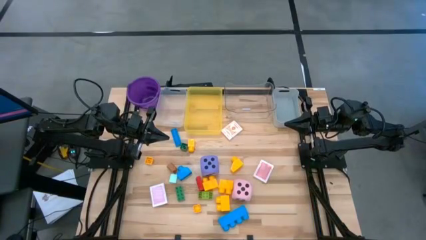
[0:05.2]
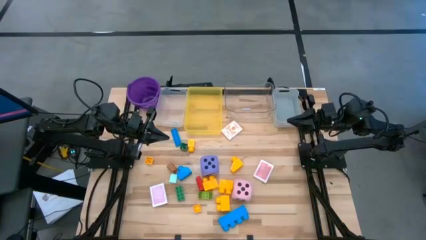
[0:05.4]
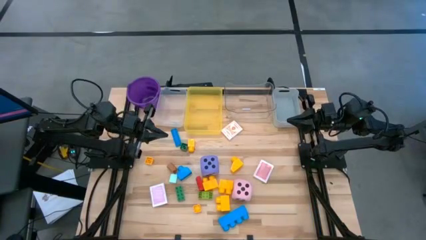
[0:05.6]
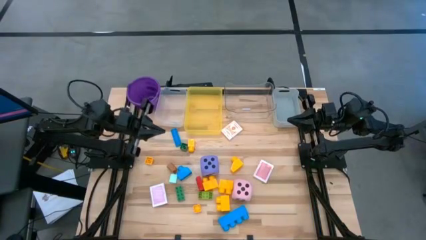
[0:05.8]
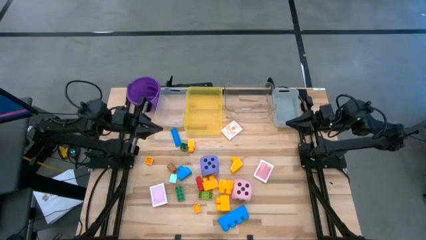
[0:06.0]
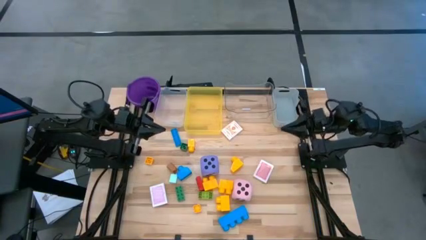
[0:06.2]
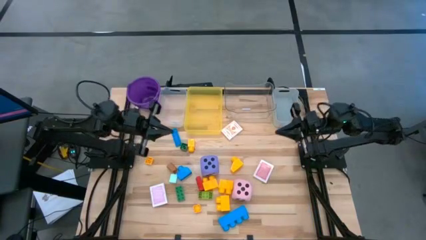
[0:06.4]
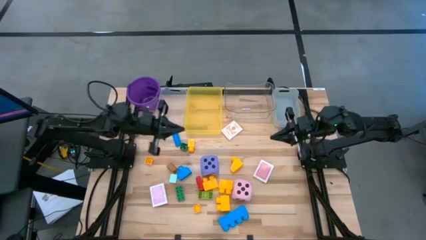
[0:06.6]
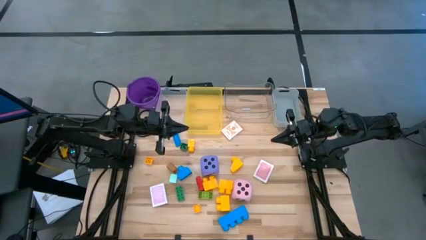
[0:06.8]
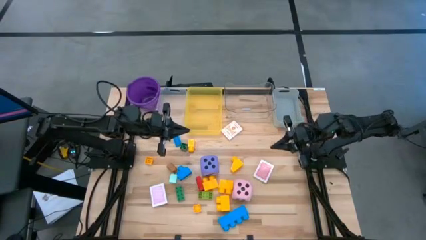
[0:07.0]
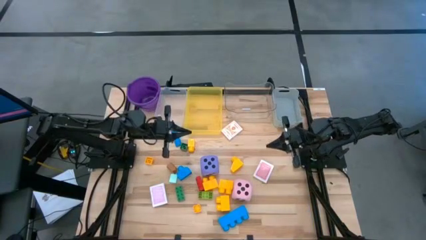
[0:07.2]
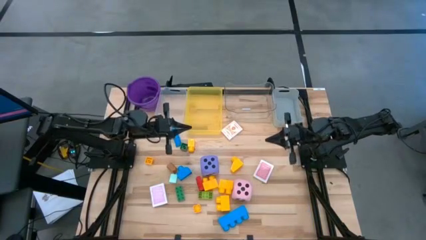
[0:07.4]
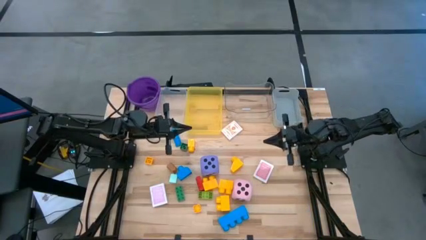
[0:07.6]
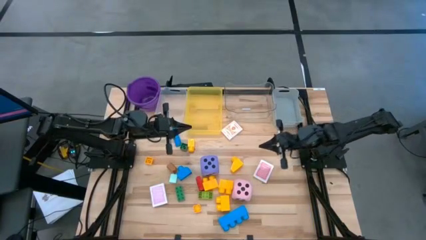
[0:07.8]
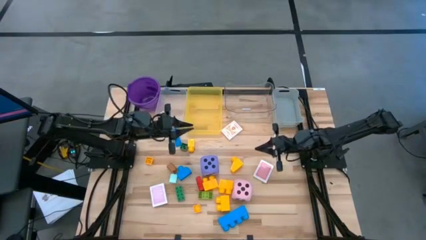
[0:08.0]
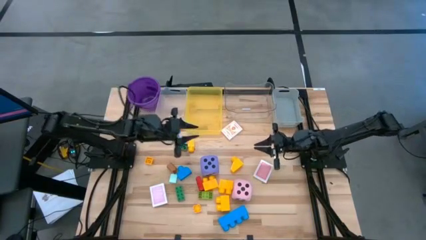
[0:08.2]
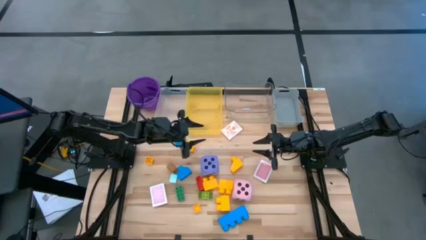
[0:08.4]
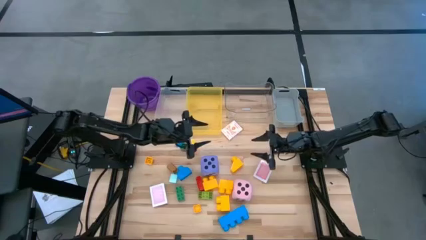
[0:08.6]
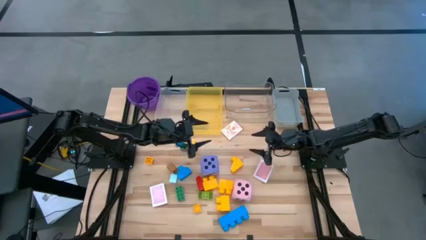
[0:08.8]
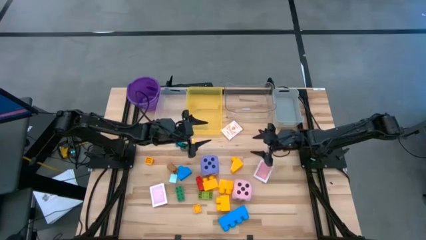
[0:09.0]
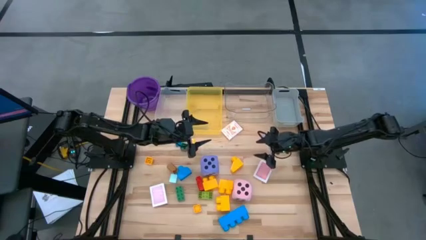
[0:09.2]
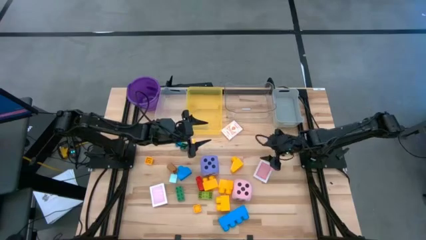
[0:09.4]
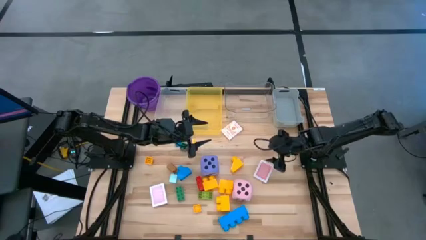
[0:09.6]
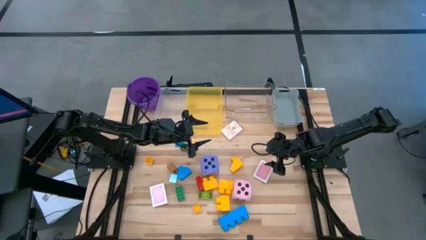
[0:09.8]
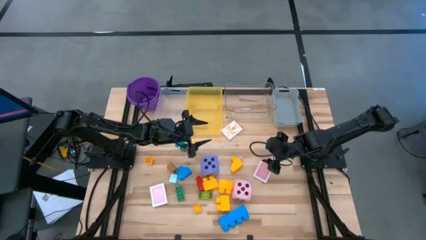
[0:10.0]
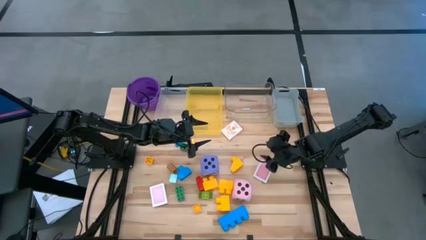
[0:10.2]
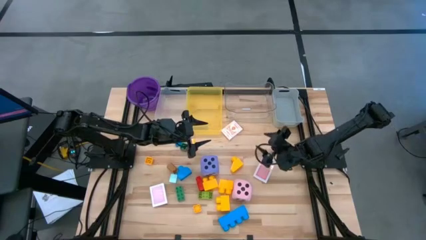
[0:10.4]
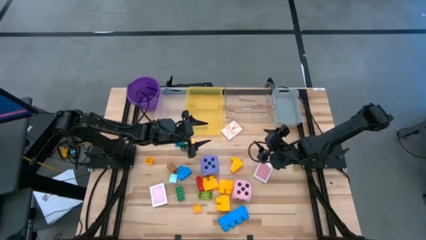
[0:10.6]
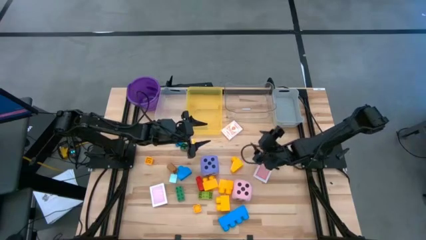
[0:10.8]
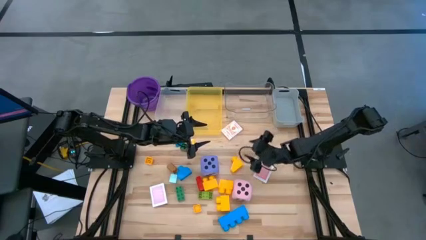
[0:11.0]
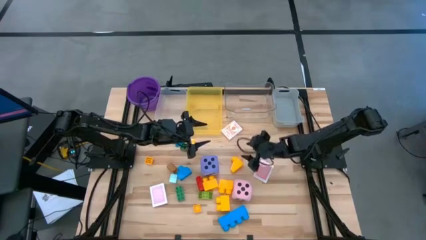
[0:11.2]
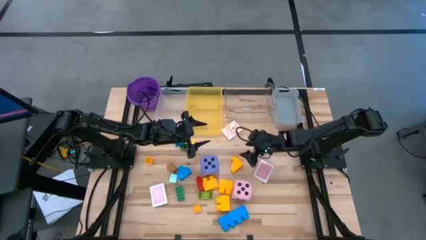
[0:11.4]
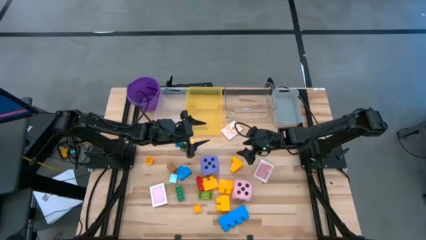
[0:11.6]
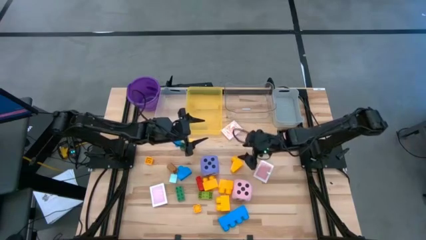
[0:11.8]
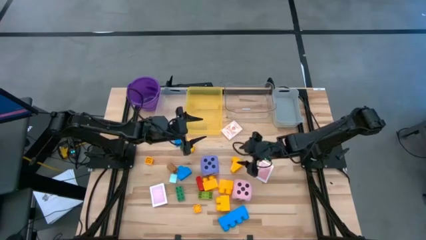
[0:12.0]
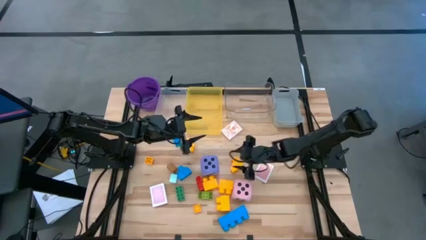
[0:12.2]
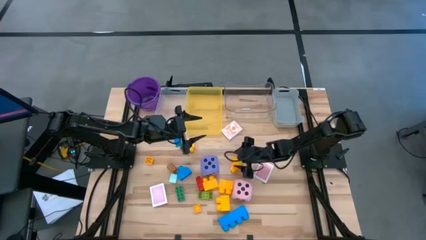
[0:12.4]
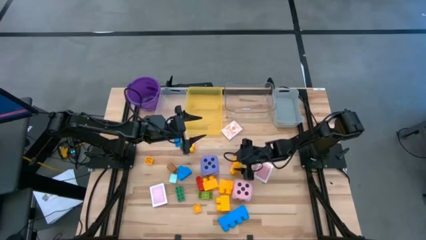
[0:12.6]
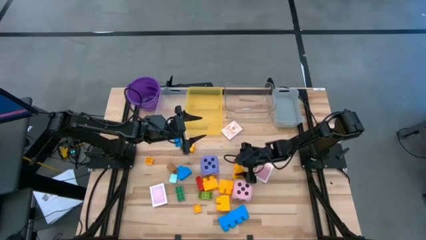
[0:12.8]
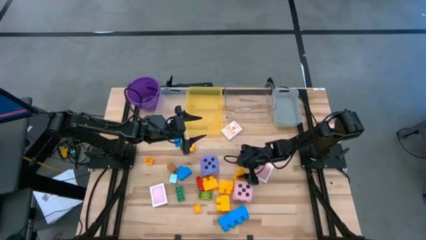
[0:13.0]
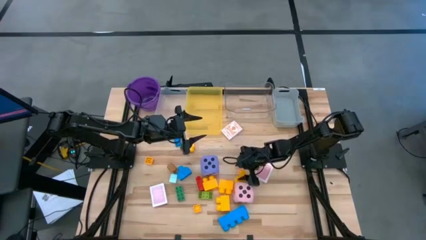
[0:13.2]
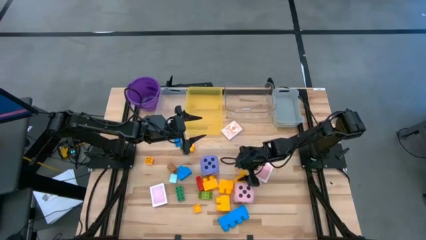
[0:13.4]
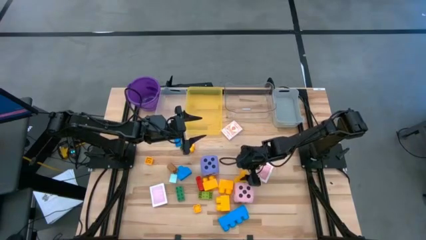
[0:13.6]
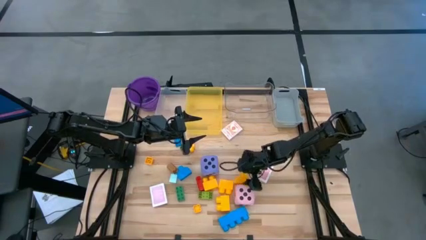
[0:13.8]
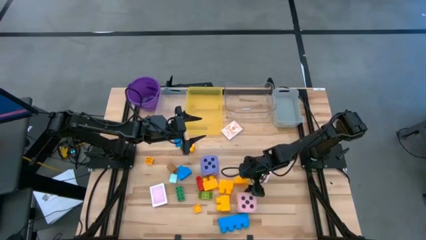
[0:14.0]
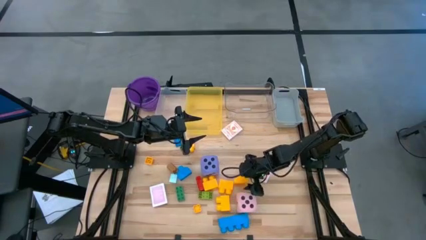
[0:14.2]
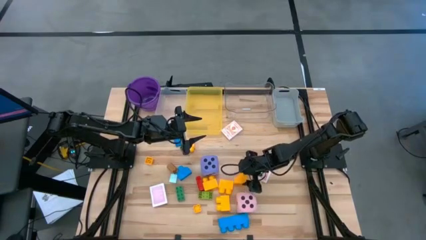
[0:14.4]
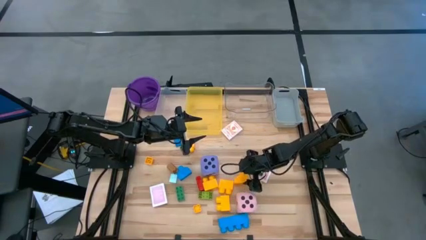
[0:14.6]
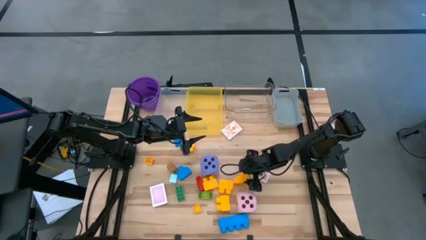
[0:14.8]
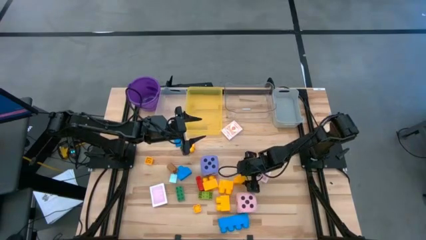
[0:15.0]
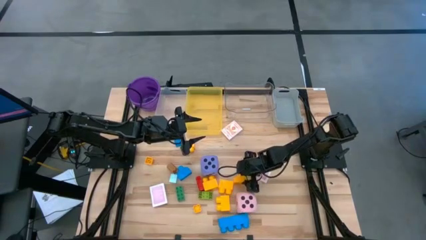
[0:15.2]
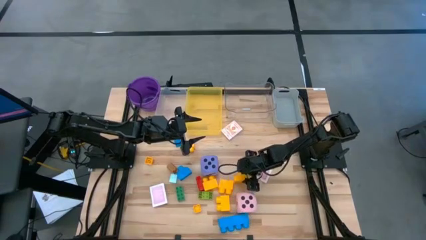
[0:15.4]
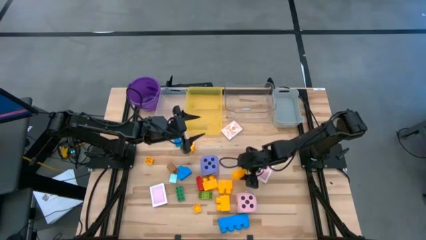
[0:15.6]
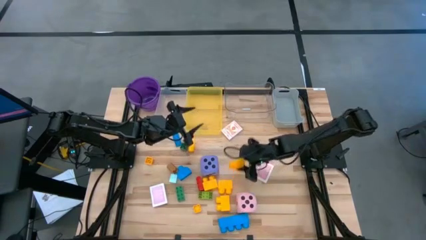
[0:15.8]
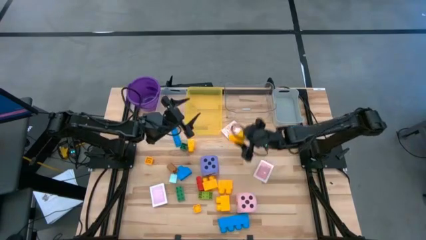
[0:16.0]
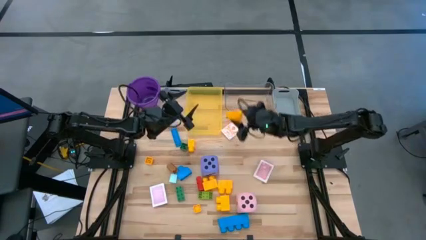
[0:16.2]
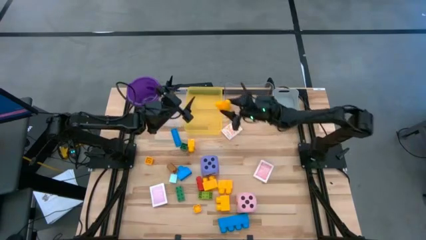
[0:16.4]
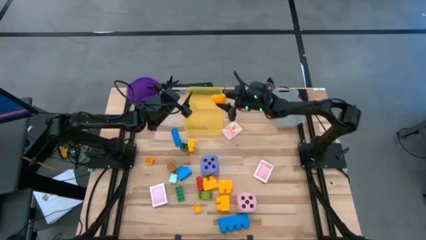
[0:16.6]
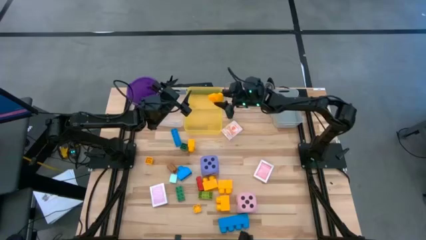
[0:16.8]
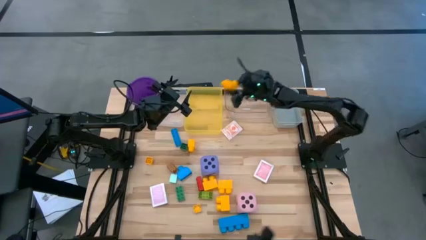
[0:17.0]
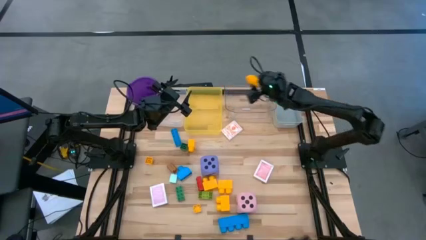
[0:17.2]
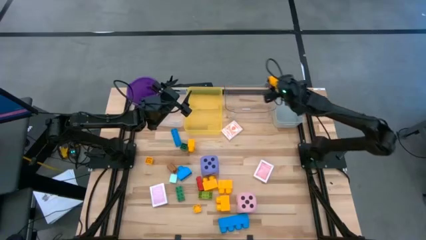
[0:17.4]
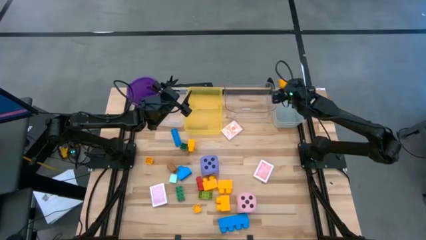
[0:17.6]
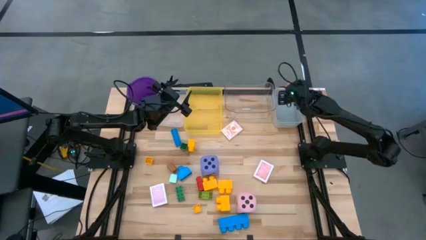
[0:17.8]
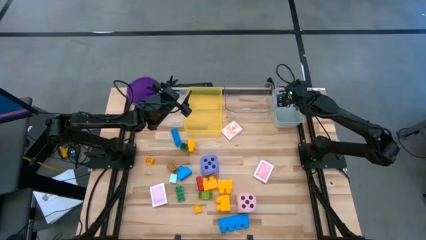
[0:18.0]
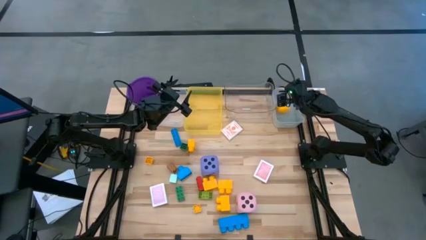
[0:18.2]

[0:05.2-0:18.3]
Task: Pick & Place Toys
Put the large yellow game piece into the gray bin

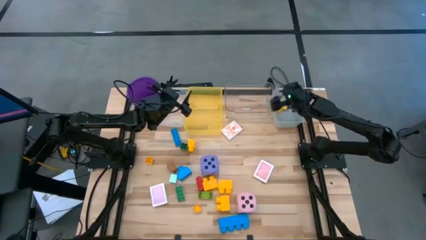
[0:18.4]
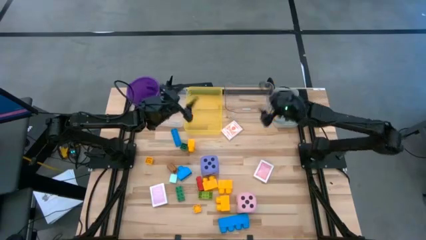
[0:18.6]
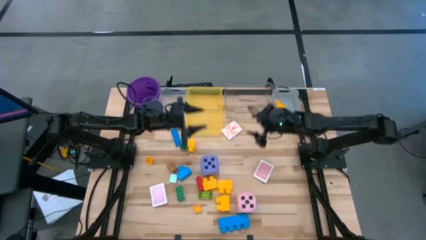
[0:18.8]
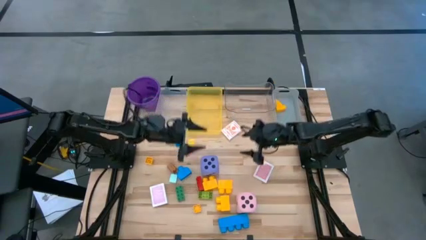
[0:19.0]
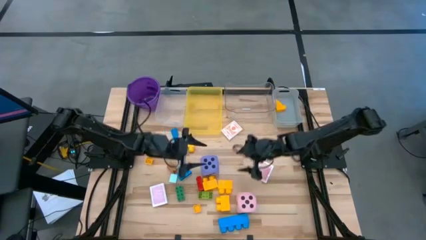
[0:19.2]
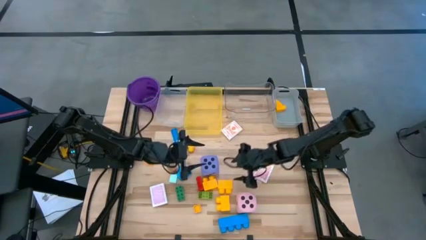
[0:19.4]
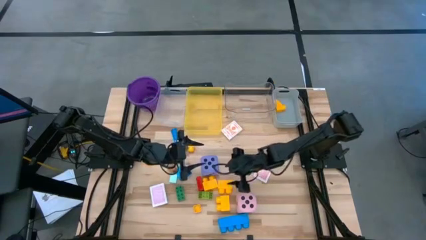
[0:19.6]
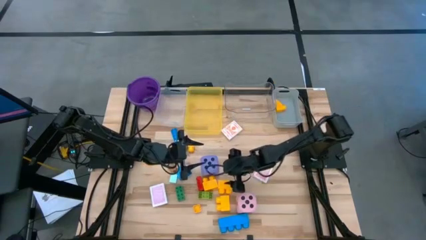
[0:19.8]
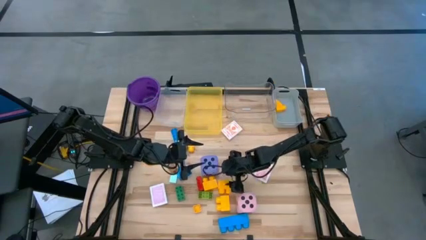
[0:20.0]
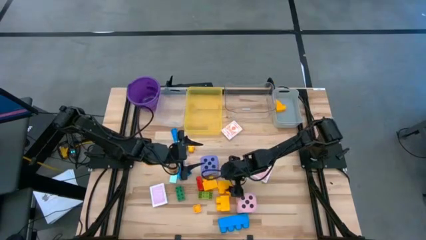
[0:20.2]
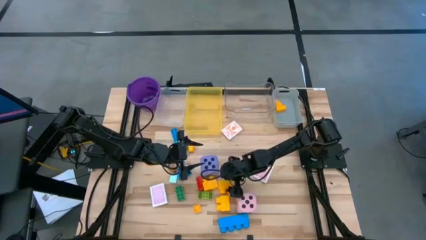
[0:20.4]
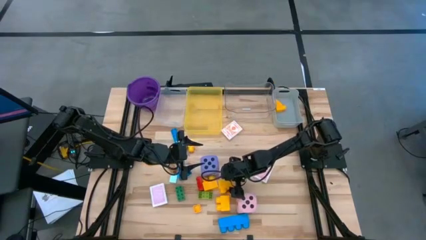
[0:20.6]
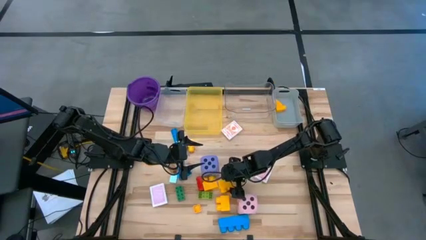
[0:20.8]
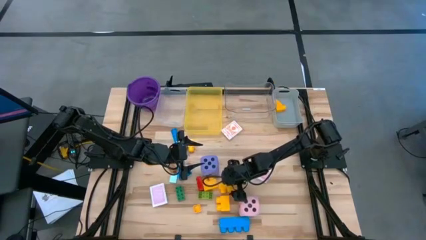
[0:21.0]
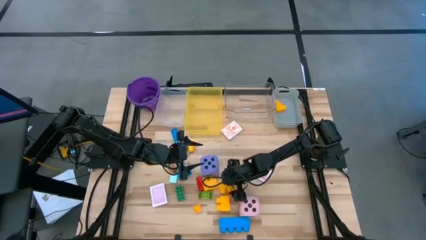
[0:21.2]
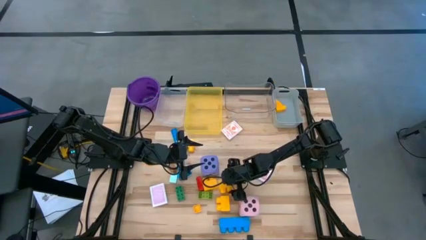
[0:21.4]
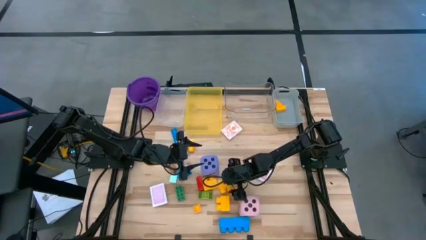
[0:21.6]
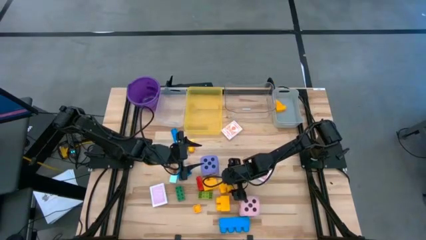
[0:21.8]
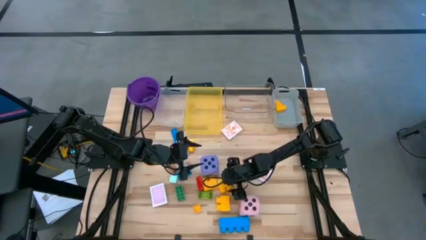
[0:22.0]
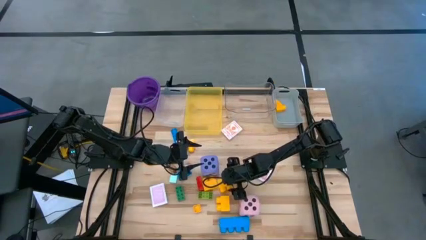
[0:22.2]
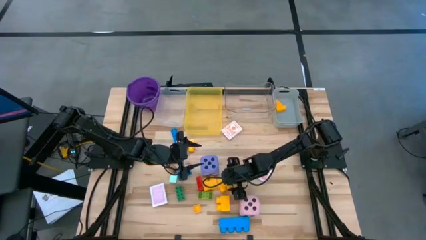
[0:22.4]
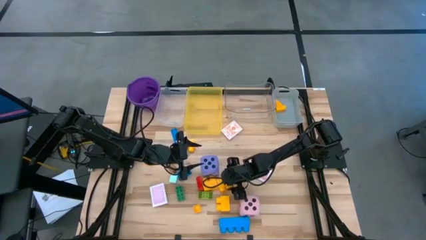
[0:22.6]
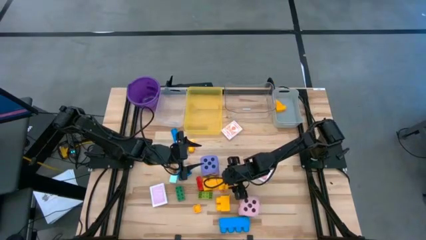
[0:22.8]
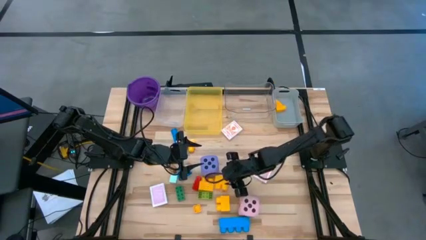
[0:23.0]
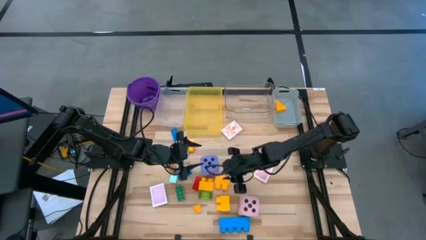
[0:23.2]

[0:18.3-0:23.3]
Put the large yellow game piece into the gray bin
